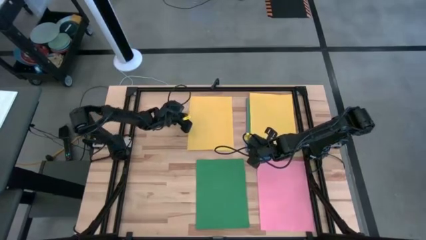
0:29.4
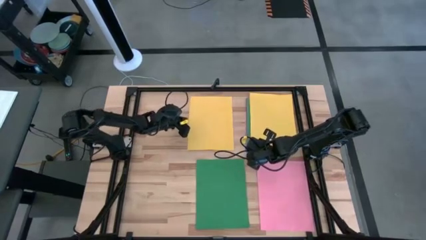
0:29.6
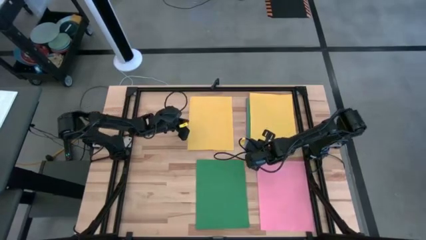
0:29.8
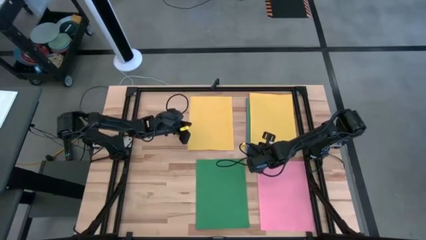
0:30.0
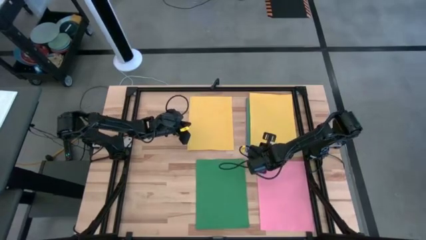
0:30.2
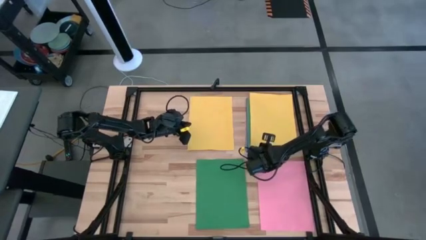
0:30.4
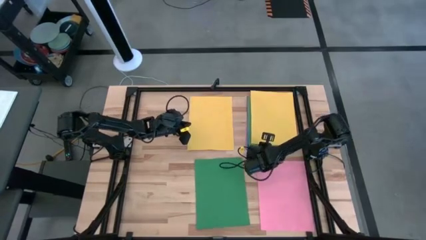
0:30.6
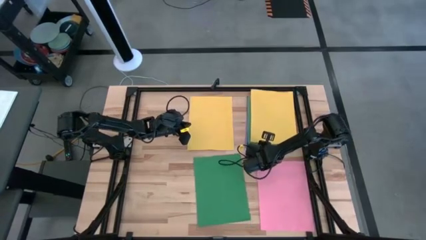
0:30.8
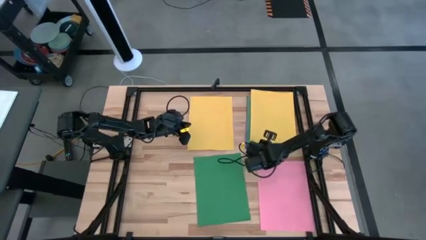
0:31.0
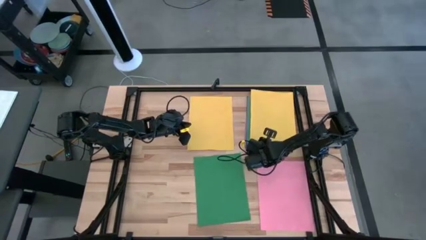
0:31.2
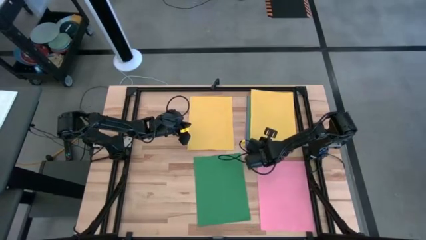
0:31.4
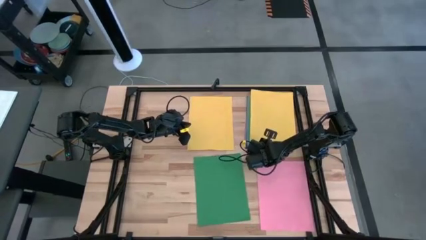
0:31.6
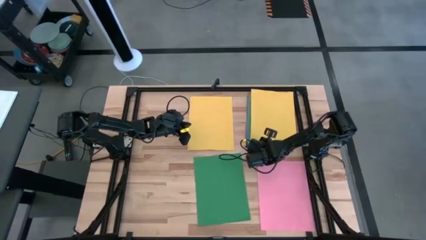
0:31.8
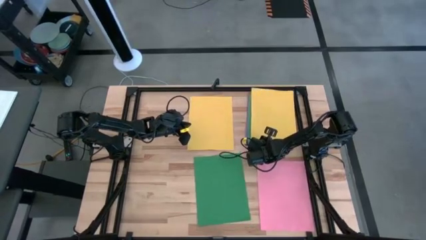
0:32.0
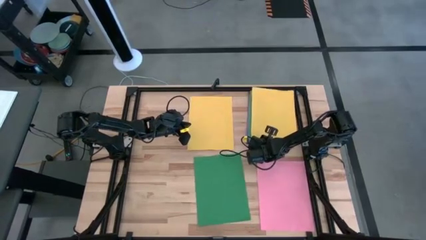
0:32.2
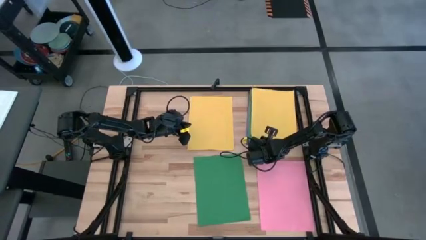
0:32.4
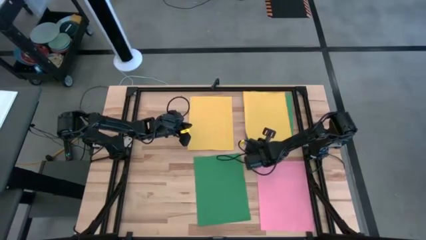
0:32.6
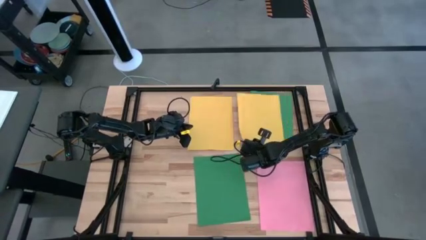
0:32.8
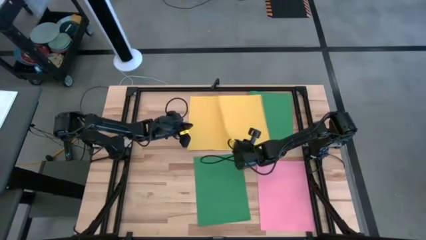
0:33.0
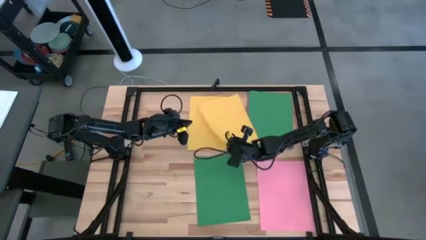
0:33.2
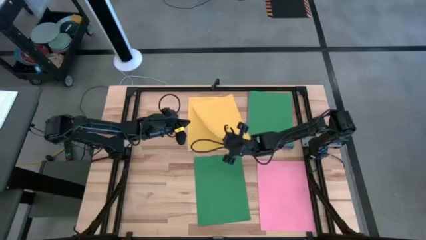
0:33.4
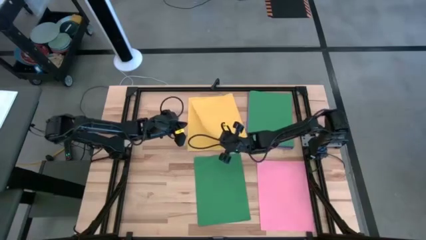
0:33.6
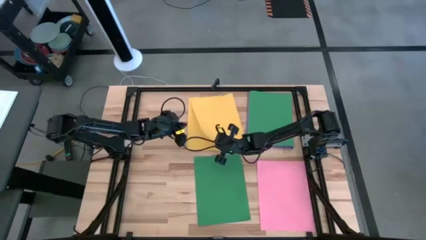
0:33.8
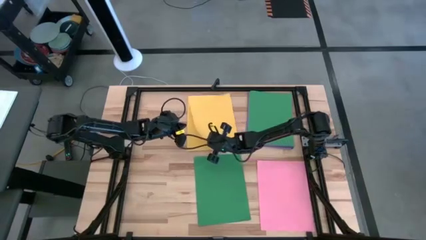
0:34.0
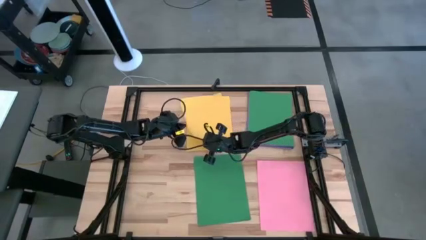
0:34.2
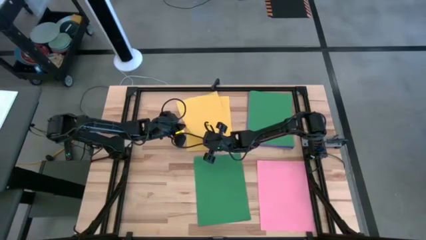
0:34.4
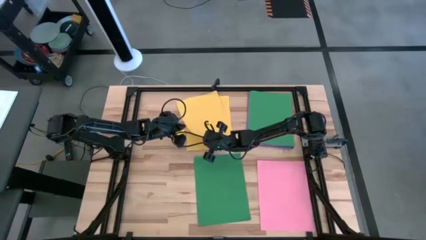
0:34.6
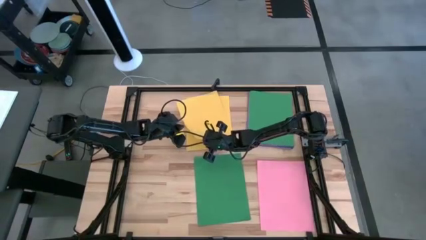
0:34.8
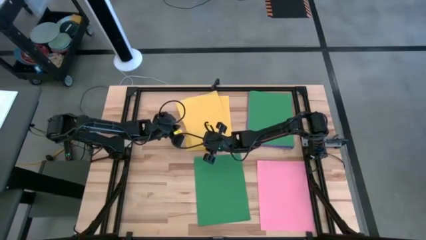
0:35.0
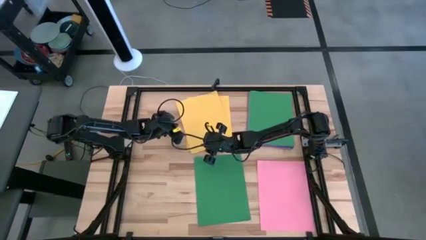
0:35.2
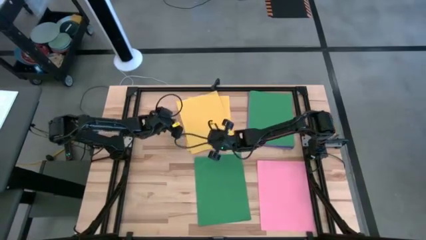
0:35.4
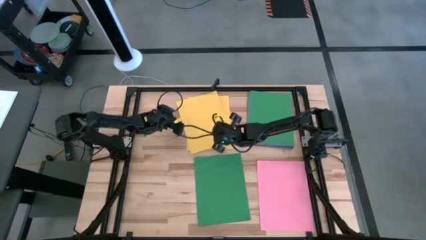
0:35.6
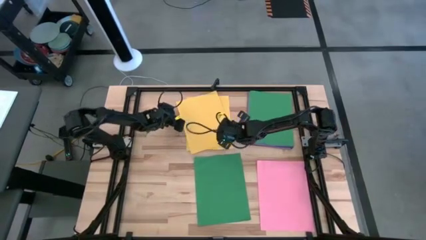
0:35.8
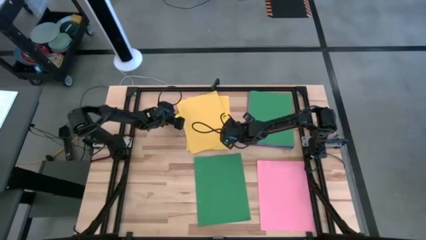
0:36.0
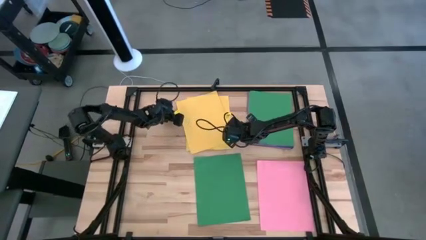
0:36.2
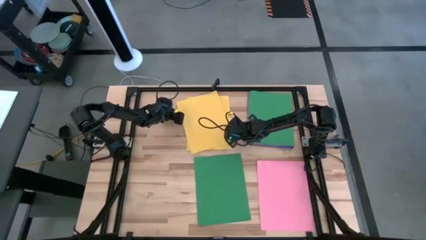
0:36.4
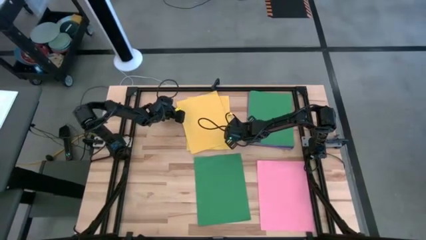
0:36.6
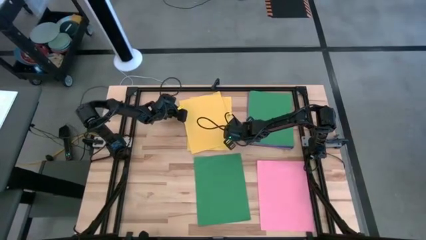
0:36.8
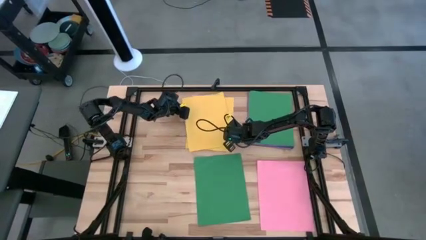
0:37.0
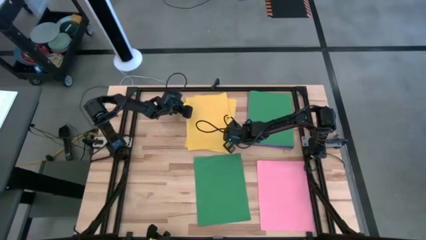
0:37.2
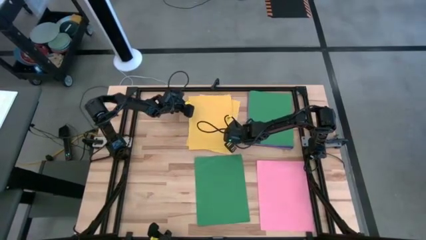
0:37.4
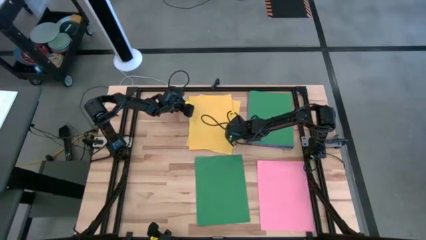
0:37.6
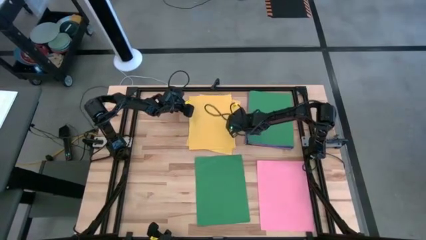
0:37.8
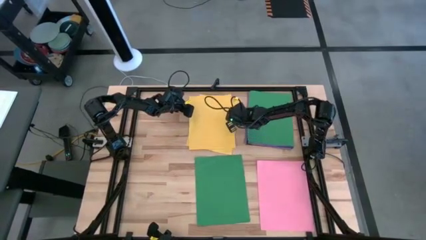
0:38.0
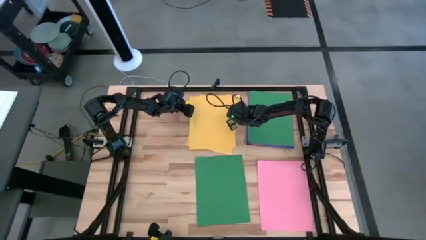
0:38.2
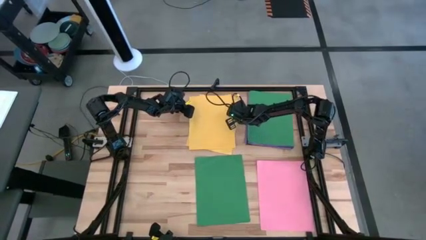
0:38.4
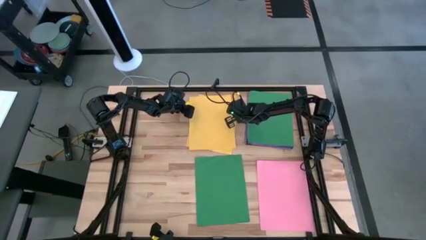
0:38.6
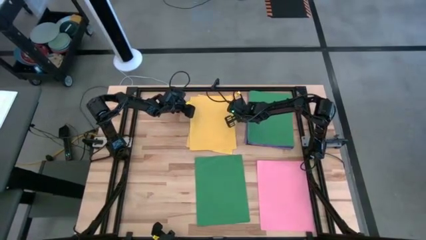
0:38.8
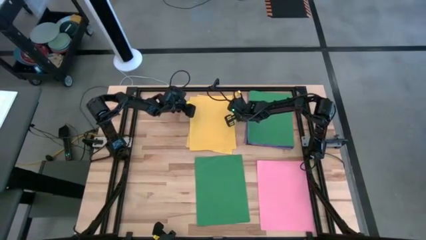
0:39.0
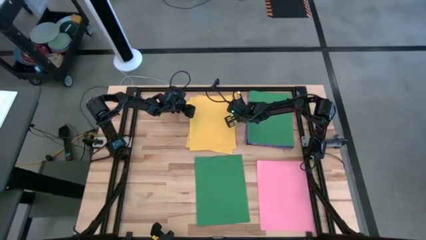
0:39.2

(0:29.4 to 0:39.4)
Task: Organize paper
Stack the yellow paper on top of the yellow paper

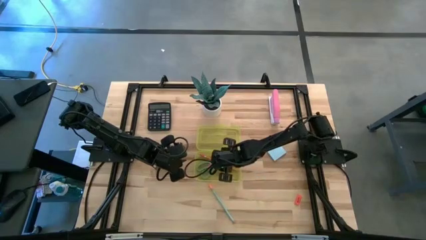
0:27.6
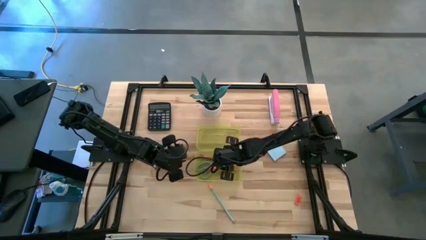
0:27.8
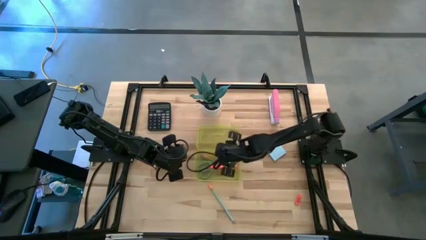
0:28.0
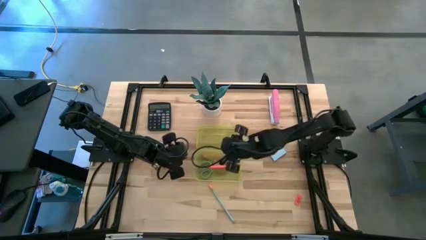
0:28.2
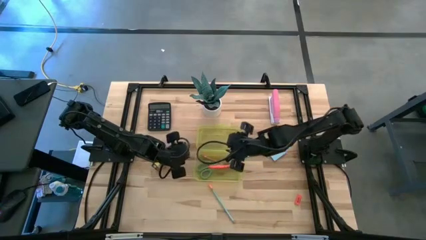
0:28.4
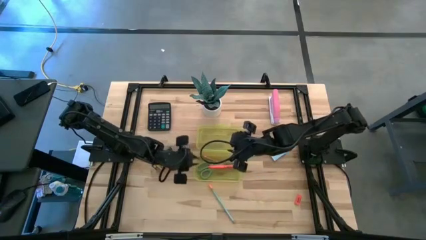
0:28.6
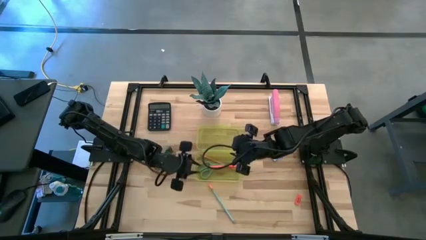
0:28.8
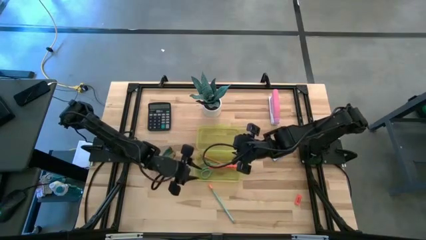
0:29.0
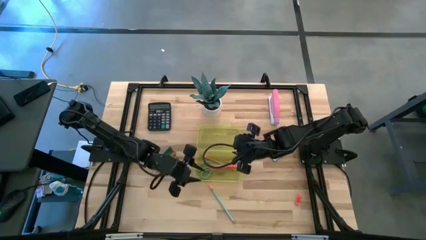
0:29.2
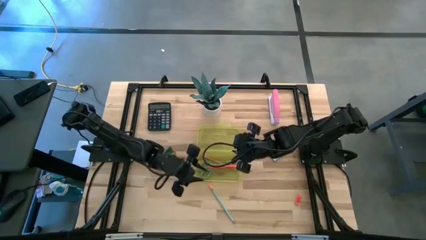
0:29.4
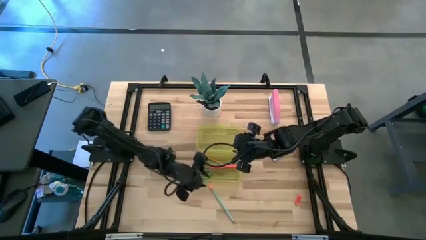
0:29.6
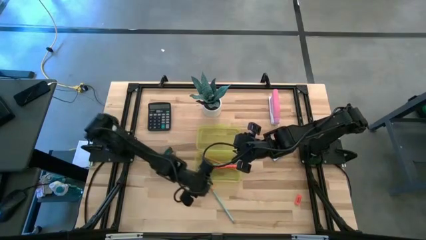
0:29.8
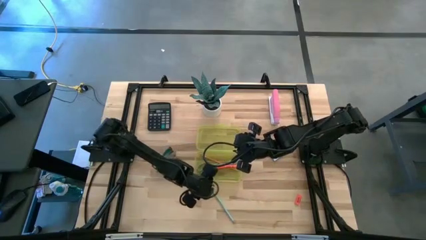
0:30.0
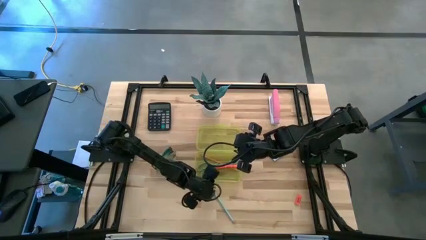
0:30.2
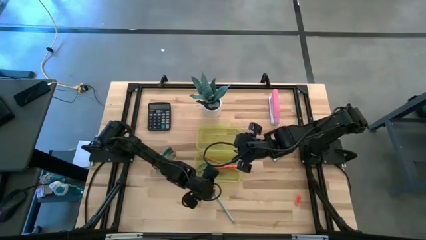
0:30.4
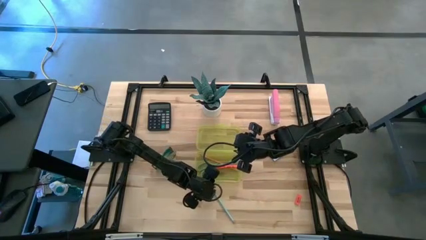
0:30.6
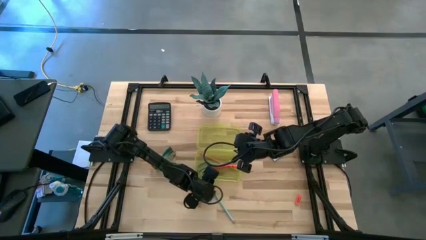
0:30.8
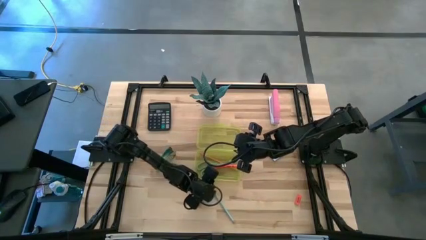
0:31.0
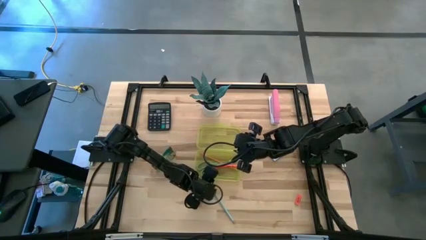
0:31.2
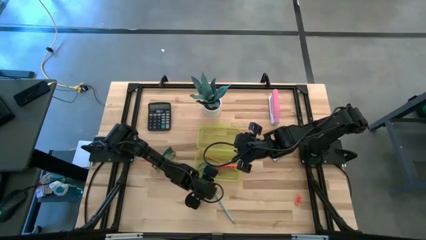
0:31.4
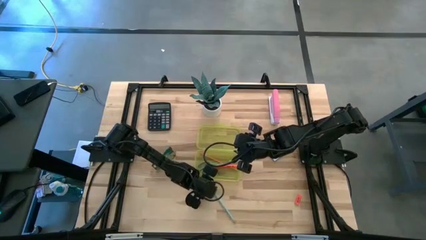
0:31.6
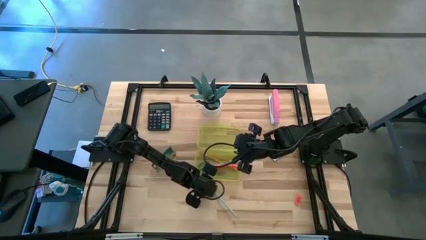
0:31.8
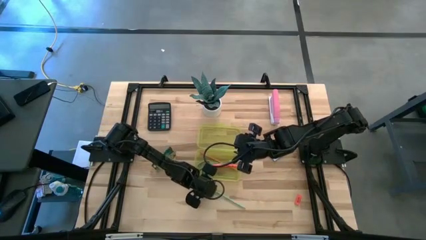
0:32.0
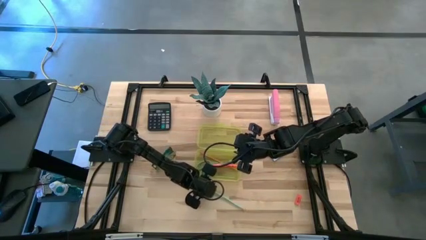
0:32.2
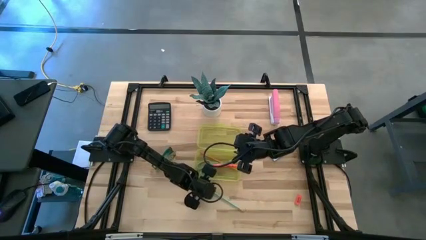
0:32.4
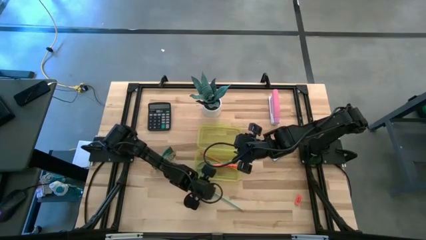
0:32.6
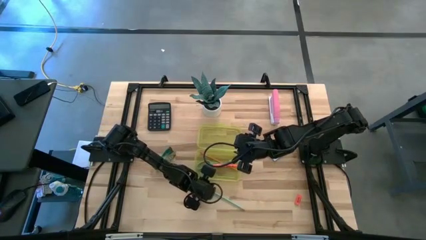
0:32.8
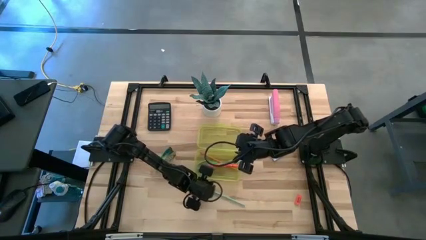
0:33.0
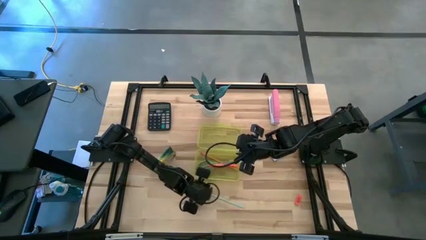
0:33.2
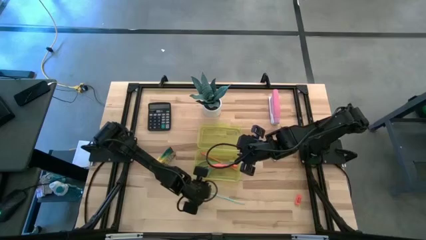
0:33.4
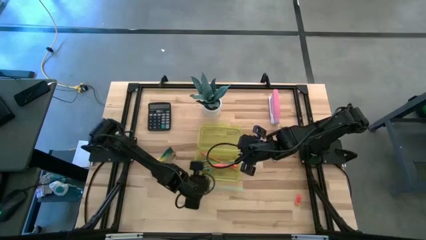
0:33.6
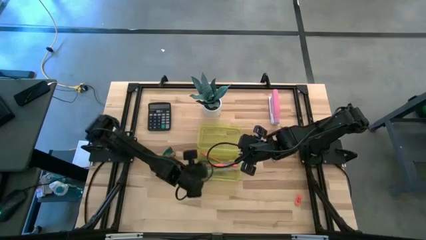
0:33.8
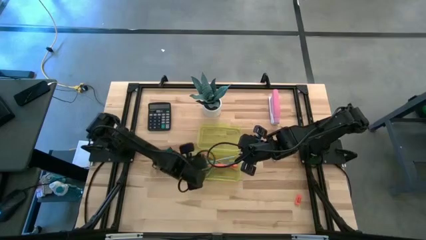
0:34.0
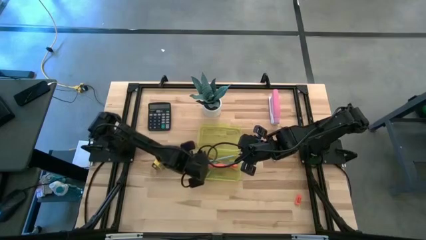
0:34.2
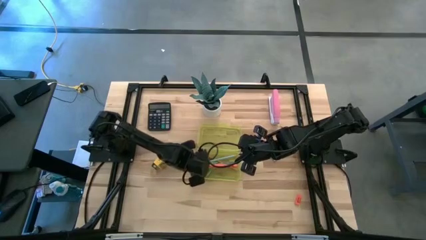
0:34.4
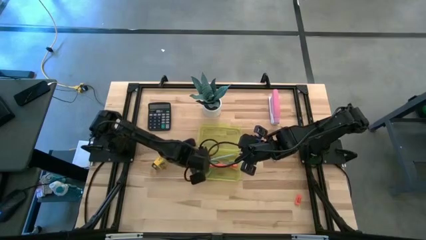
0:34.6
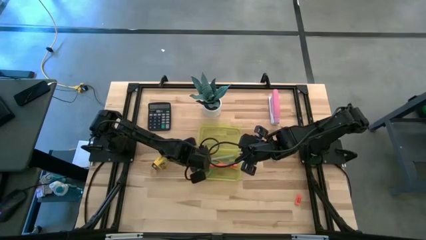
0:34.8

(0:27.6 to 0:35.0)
Task: Pack school essentials
Put the blue pencil into the yellow box
